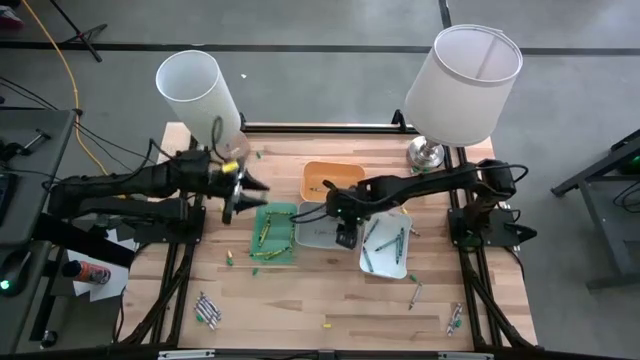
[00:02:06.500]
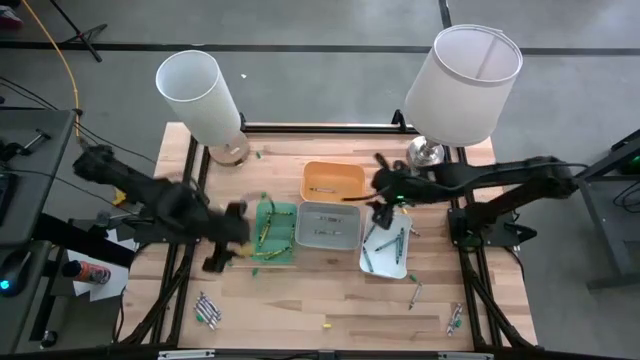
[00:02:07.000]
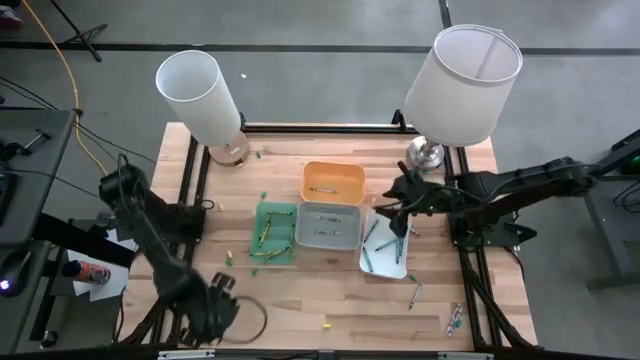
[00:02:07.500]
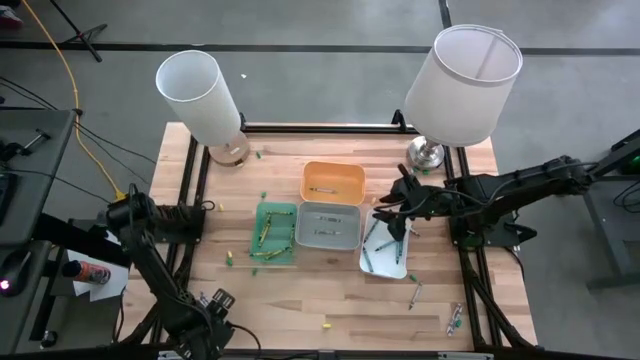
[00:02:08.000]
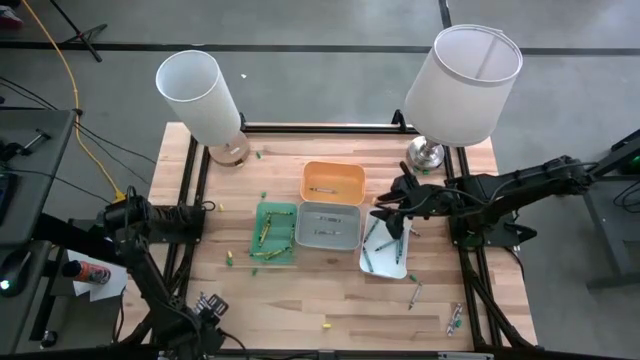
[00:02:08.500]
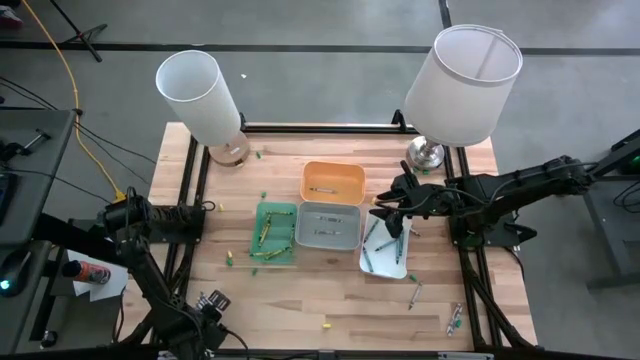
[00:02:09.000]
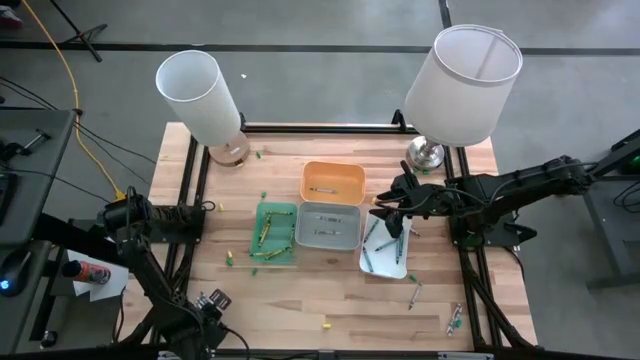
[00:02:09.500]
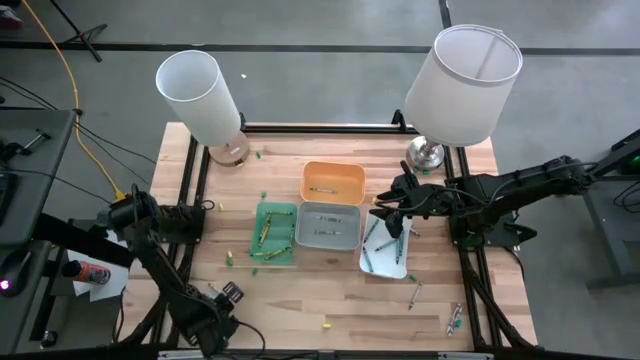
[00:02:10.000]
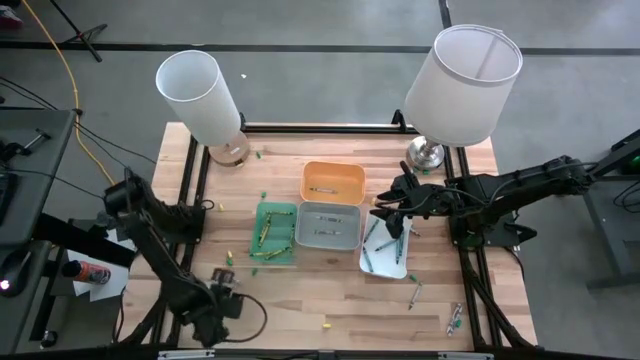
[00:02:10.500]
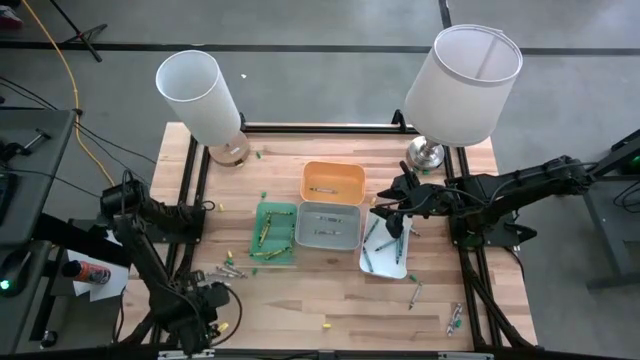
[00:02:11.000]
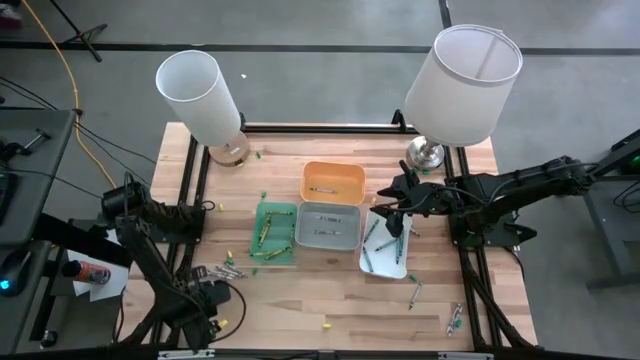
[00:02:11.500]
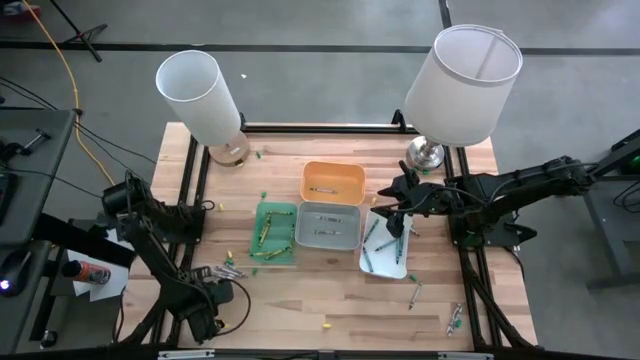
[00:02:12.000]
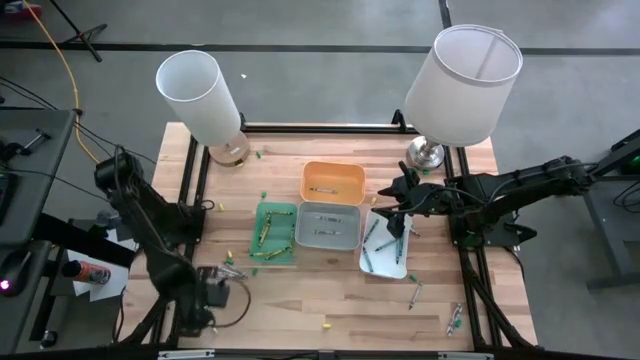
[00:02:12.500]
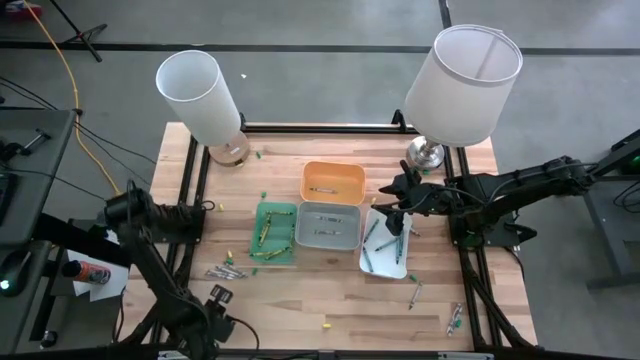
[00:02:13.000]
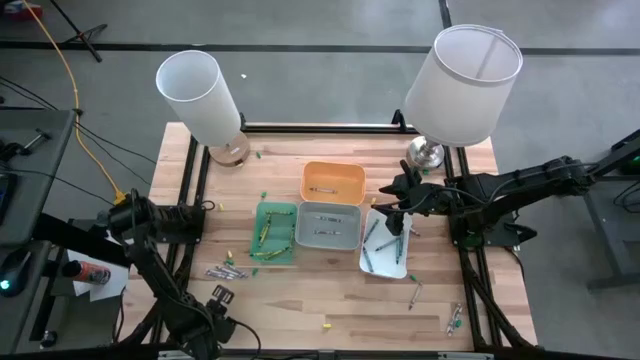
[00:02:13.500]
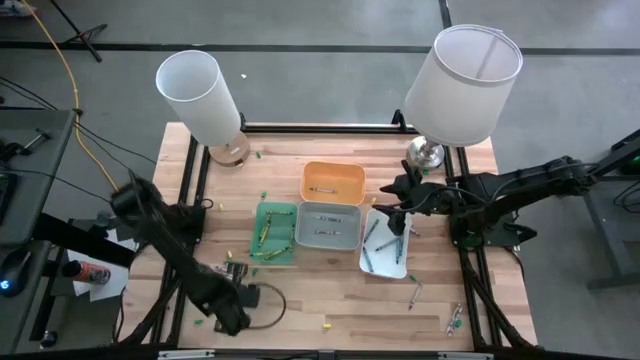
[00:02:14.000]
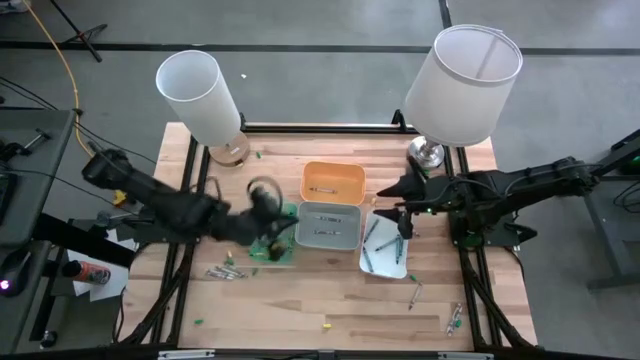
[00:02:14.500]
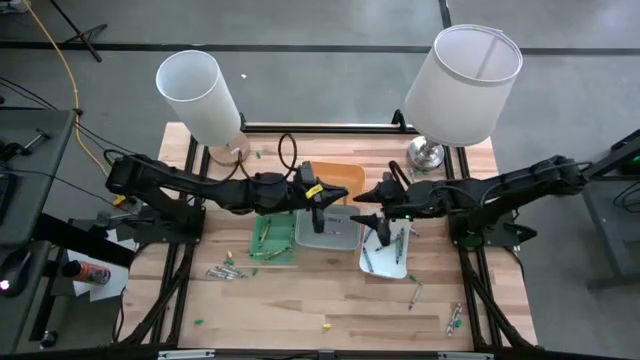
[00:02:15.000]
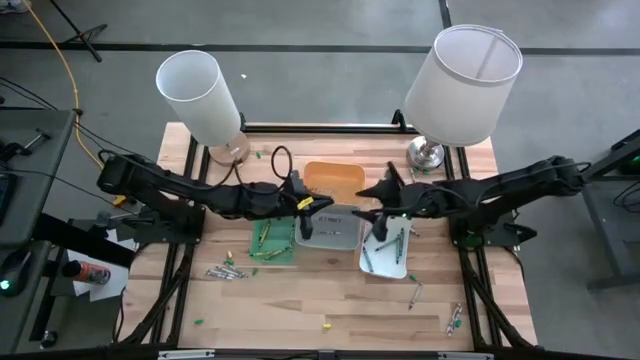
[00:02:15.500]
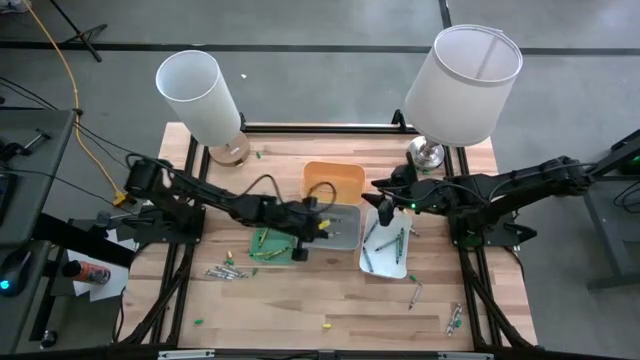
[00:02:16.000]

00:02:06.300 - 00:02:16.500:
Task: Sort crayons
Put the white crayon into the gray bin

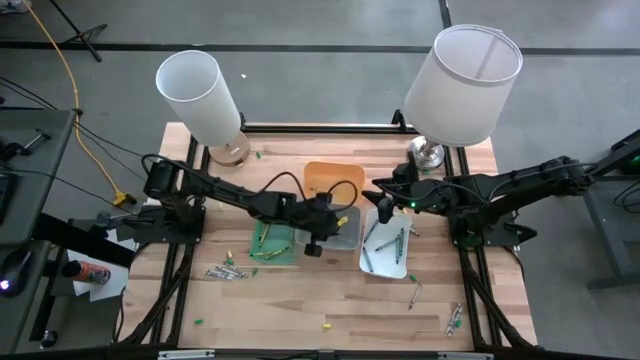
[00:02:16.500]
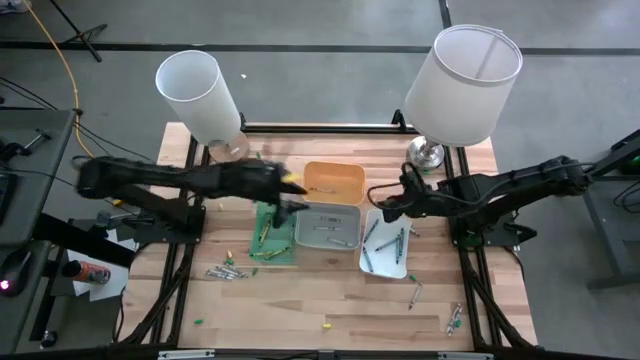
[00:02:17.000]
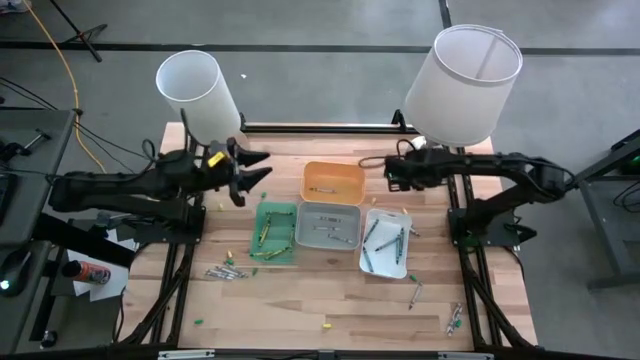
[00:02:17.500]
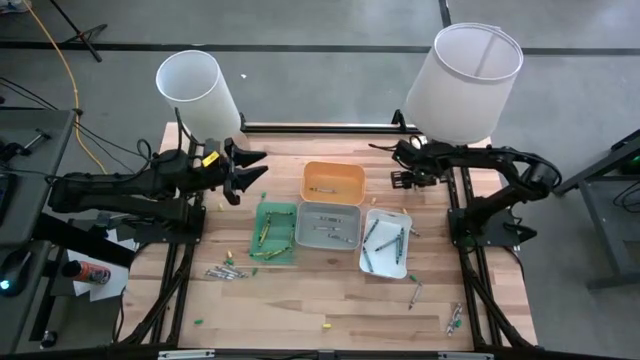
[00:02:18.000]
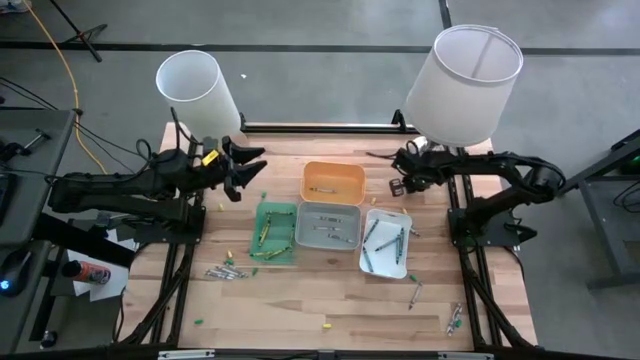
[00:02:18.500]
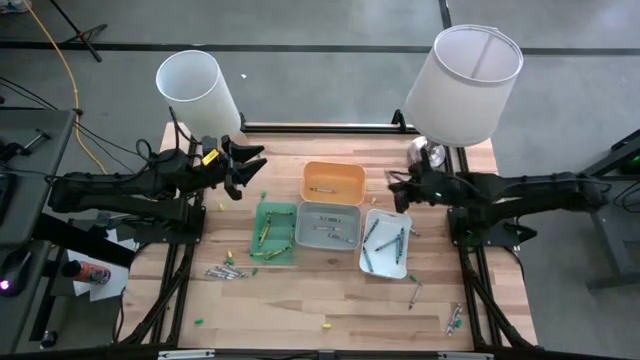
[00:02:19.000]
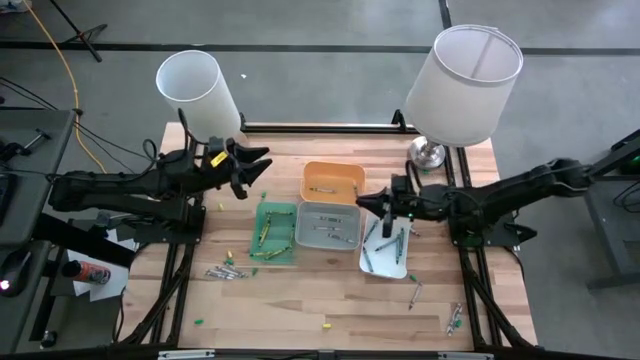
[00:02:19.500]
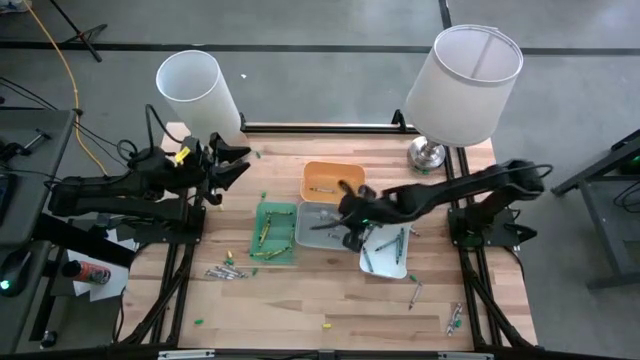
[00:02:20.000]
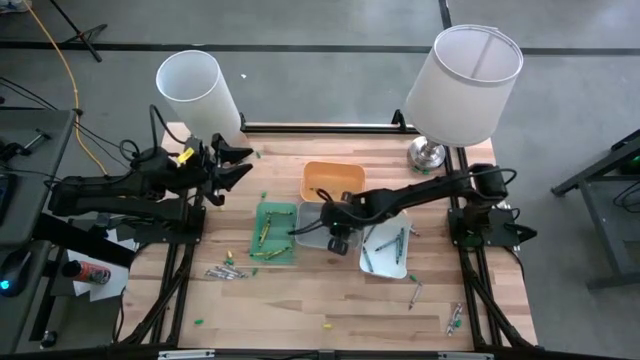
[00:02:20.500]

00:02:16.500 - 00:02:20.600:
Put the white crayon into the gray bin

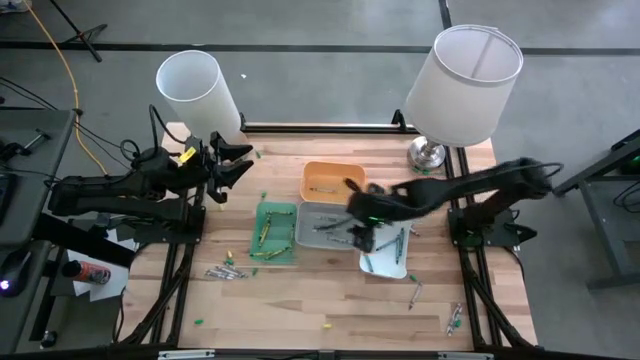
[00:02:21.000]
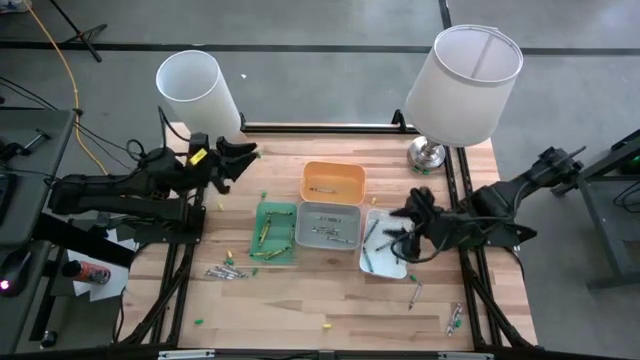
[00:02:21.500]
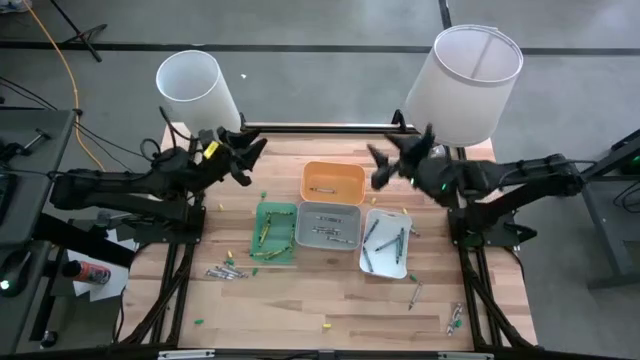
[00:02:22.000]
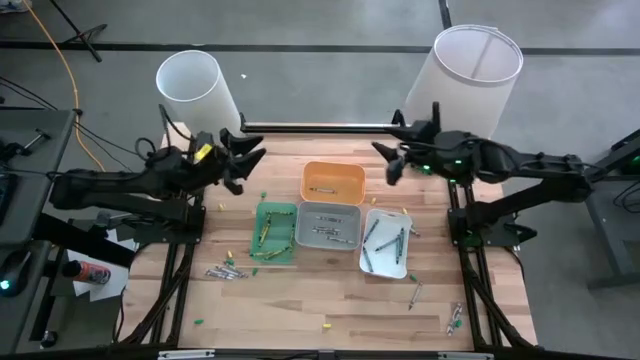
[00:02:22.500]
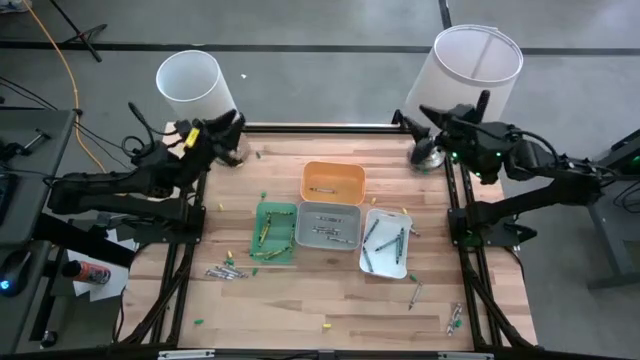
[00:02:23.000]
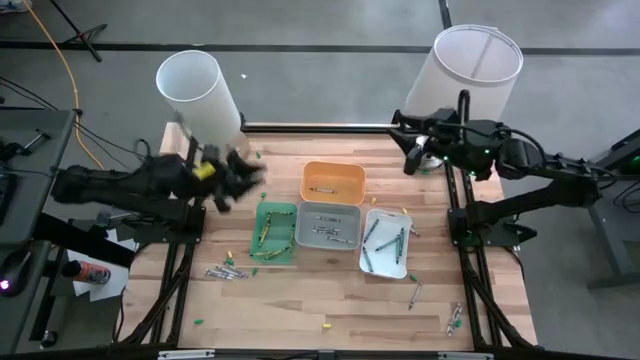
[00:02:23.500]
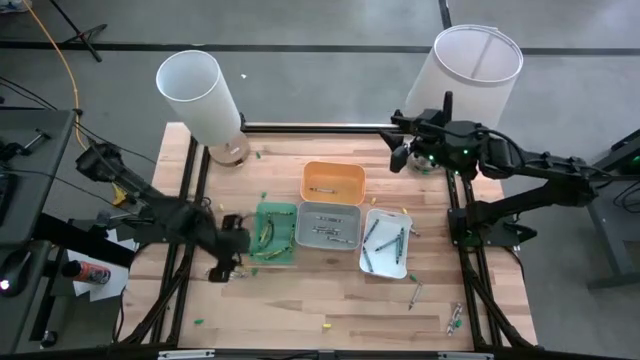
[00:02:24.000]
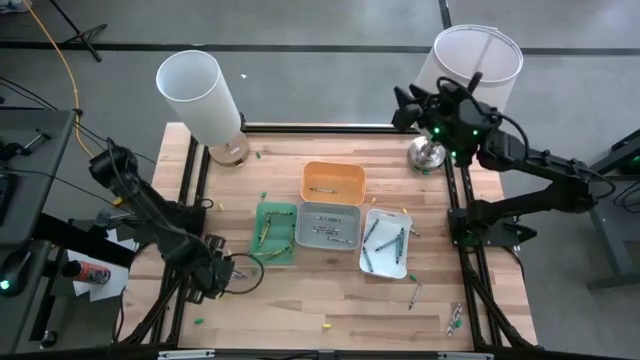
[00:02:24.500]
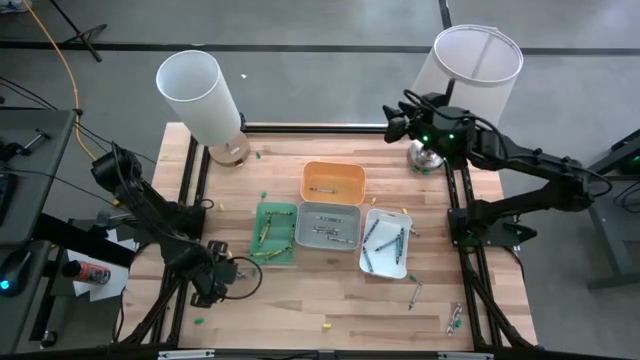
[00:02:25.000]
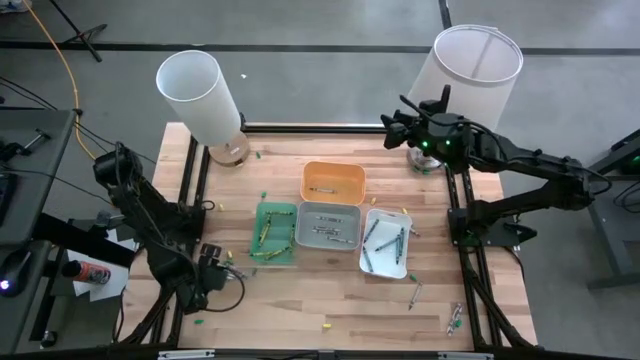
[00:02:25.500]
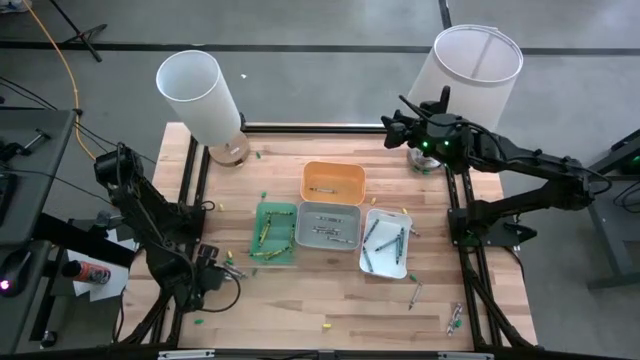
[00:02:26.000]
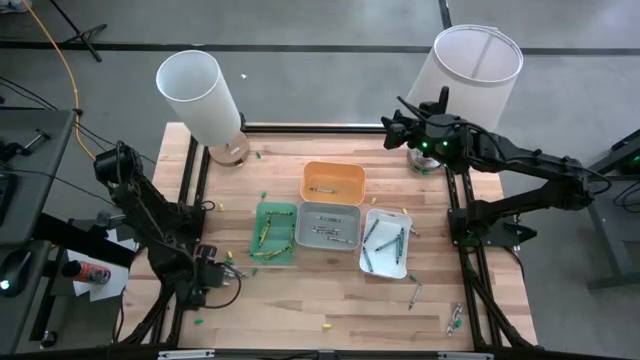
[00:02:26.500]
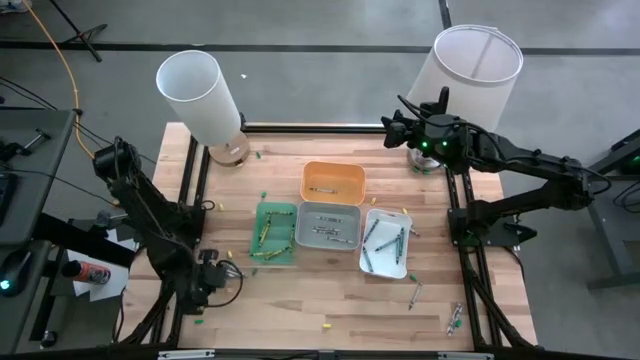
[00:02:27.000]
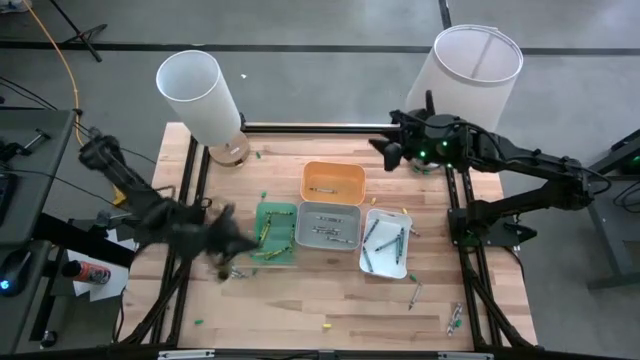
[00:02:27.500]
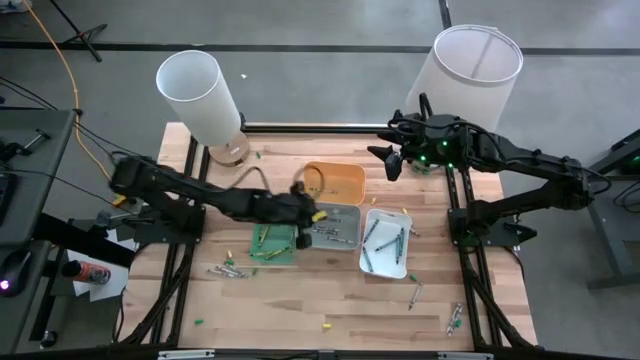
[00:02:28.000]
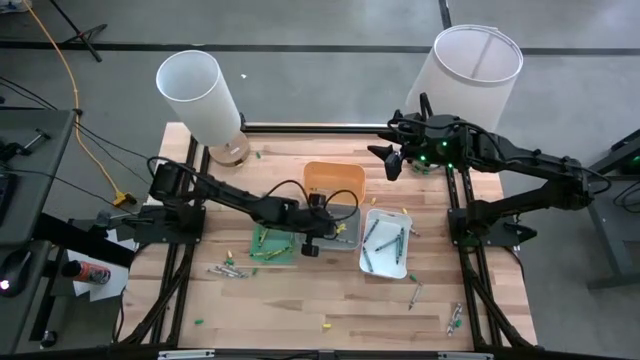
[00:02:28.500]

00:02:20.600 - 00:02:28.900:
Put the white crayon into the gray bin
